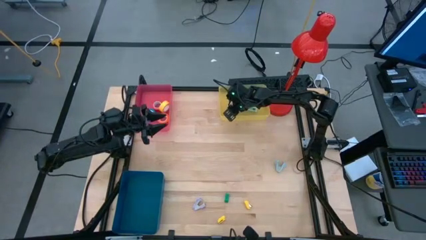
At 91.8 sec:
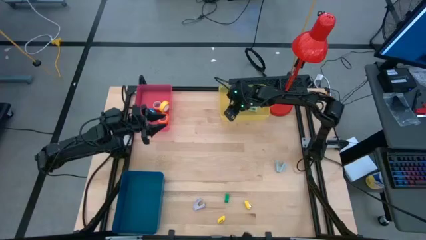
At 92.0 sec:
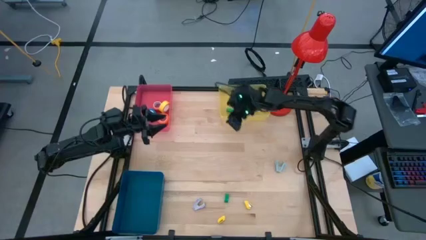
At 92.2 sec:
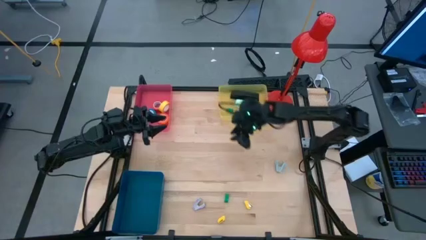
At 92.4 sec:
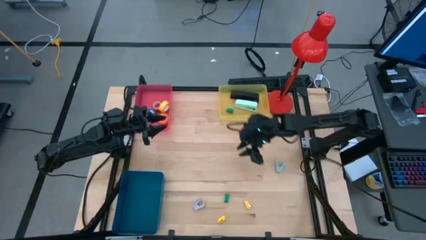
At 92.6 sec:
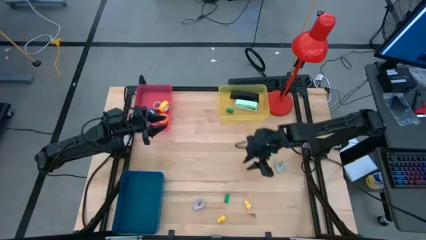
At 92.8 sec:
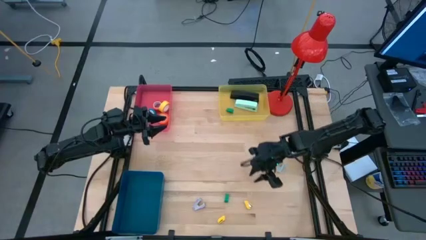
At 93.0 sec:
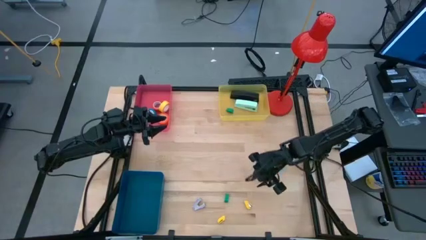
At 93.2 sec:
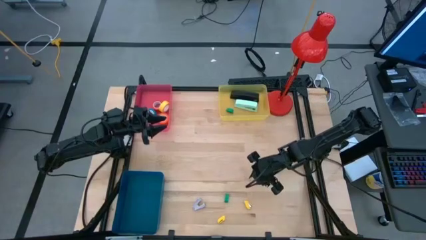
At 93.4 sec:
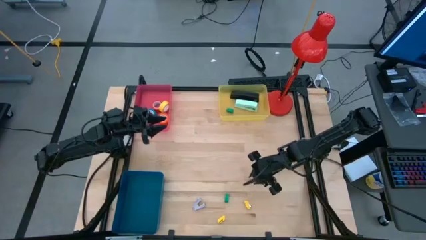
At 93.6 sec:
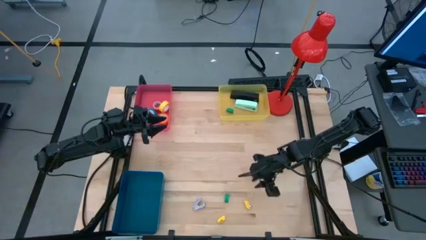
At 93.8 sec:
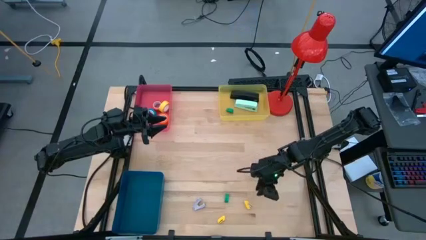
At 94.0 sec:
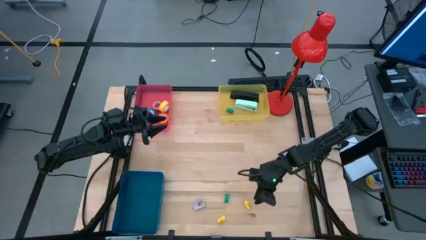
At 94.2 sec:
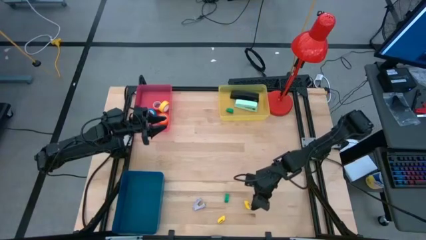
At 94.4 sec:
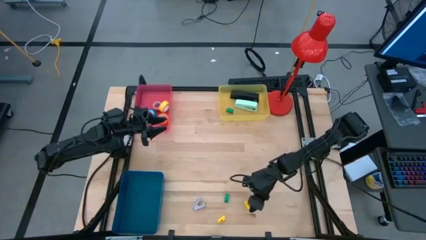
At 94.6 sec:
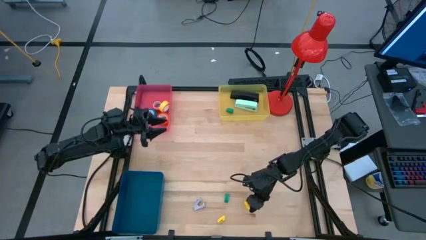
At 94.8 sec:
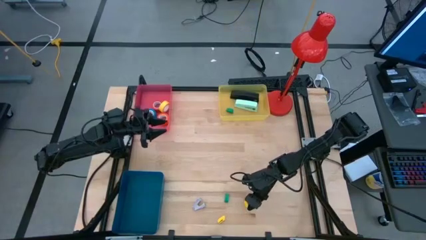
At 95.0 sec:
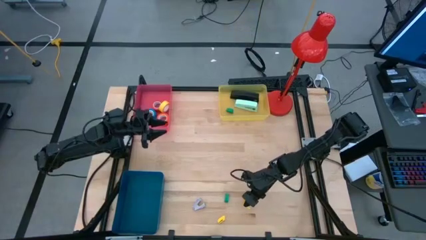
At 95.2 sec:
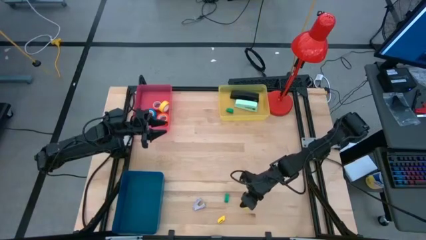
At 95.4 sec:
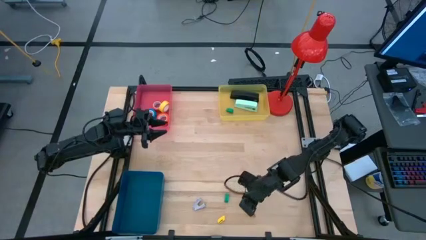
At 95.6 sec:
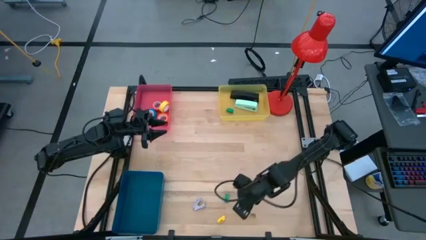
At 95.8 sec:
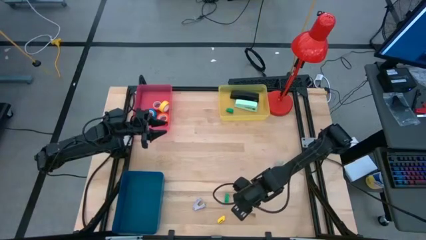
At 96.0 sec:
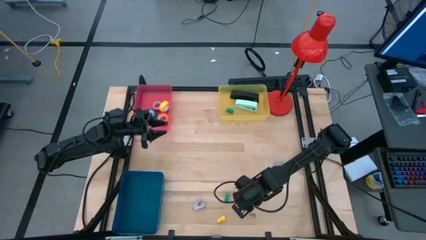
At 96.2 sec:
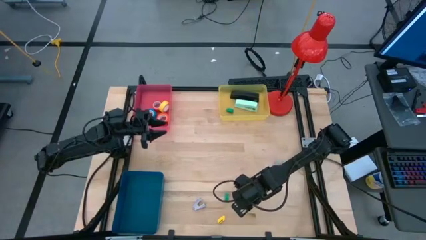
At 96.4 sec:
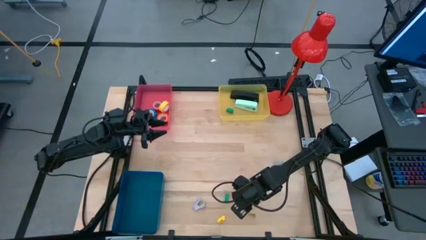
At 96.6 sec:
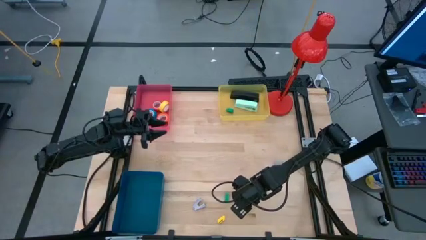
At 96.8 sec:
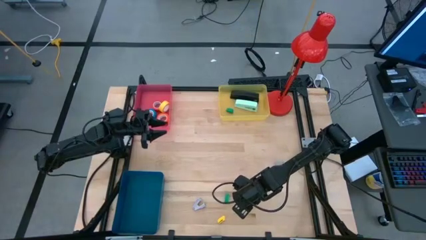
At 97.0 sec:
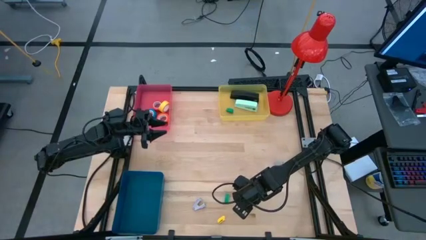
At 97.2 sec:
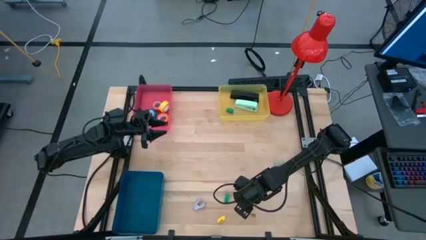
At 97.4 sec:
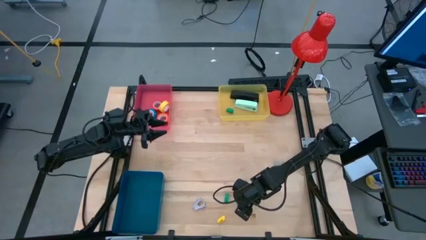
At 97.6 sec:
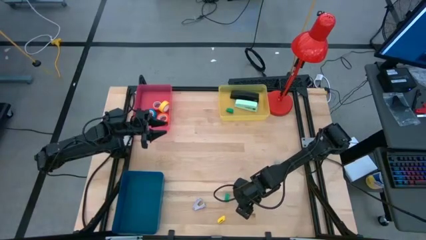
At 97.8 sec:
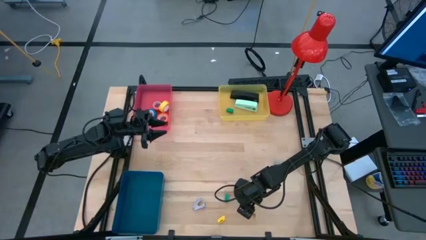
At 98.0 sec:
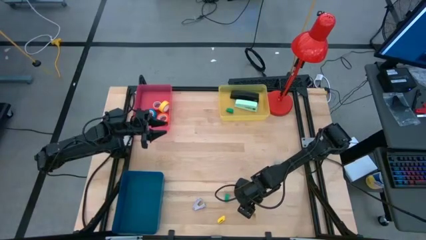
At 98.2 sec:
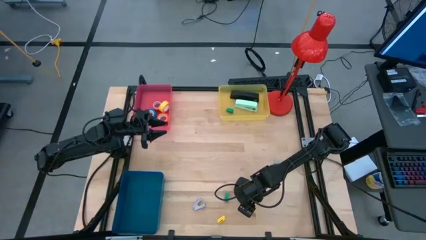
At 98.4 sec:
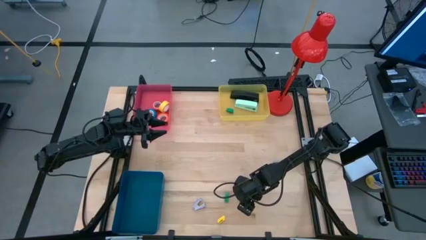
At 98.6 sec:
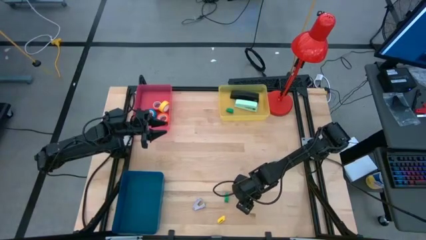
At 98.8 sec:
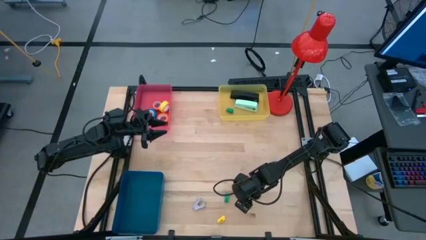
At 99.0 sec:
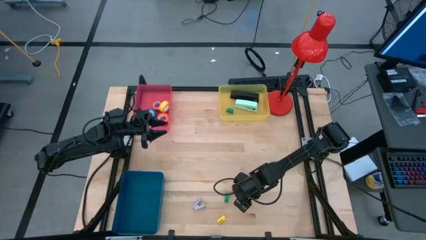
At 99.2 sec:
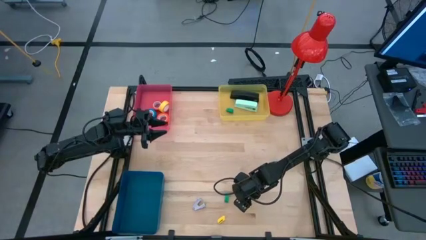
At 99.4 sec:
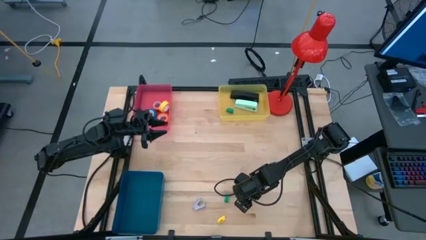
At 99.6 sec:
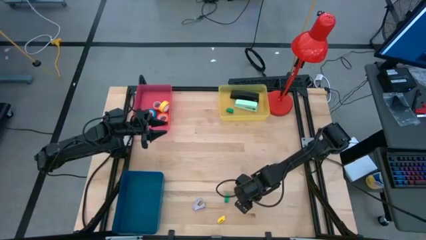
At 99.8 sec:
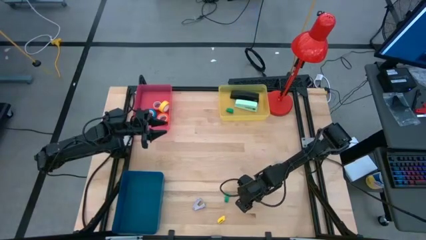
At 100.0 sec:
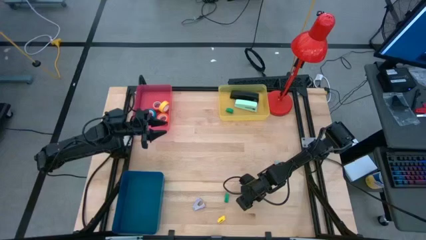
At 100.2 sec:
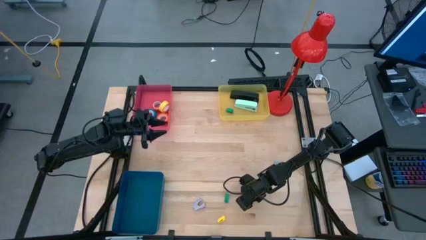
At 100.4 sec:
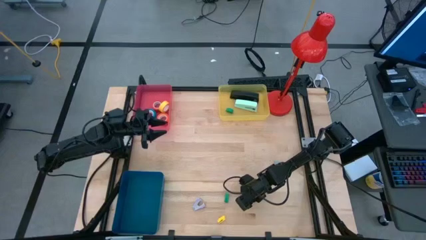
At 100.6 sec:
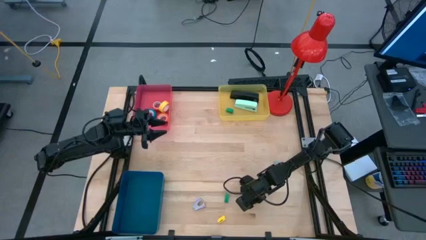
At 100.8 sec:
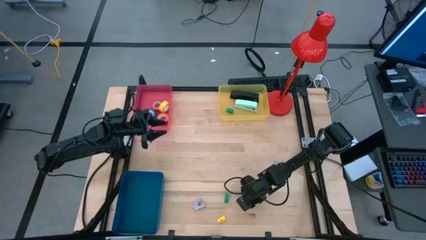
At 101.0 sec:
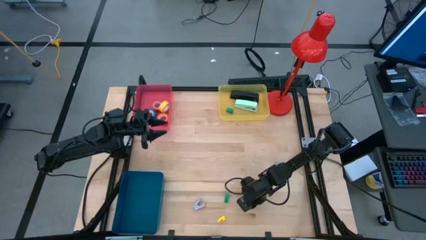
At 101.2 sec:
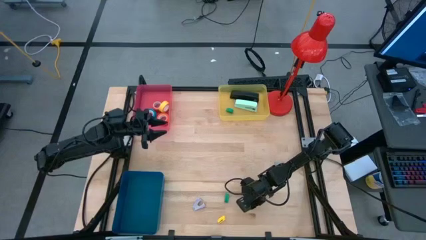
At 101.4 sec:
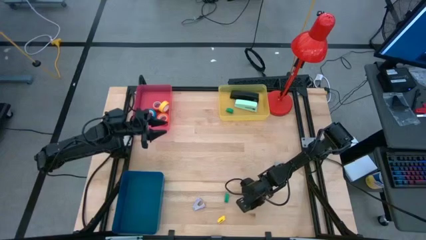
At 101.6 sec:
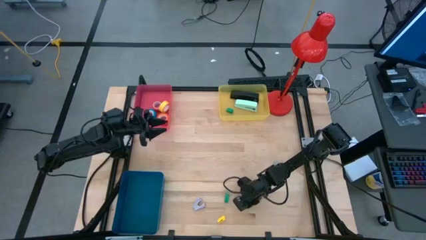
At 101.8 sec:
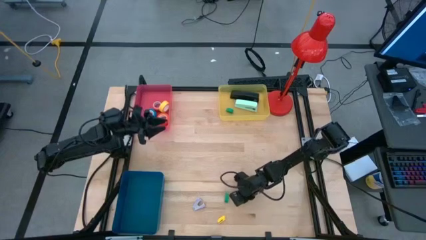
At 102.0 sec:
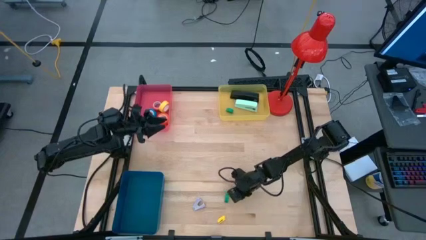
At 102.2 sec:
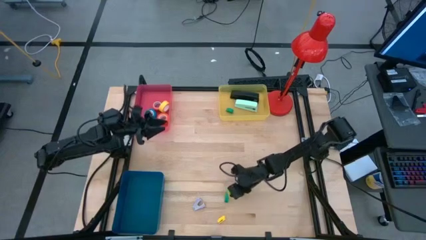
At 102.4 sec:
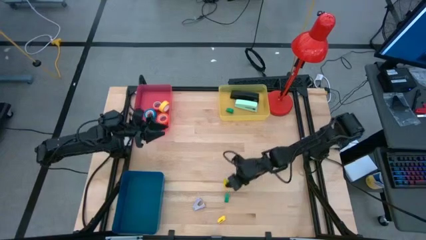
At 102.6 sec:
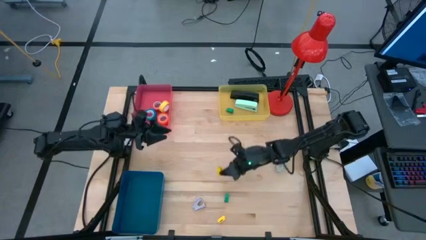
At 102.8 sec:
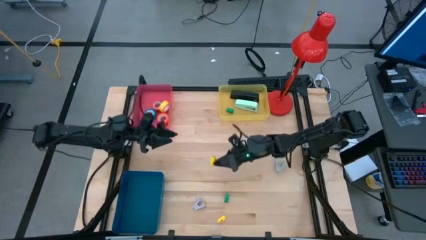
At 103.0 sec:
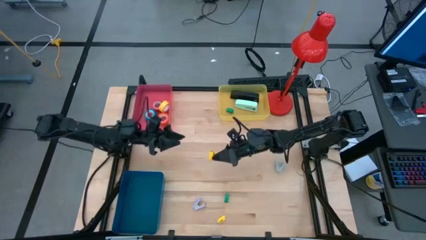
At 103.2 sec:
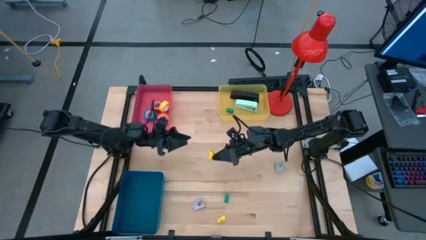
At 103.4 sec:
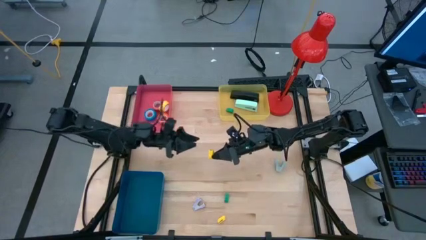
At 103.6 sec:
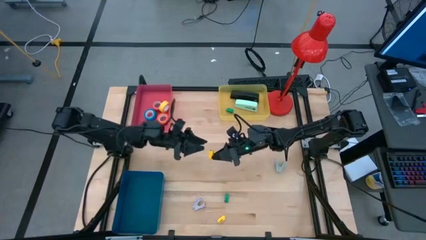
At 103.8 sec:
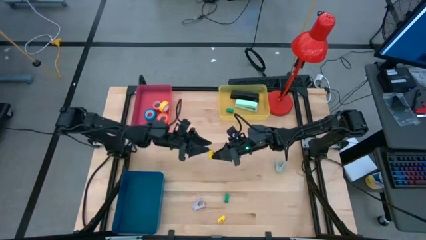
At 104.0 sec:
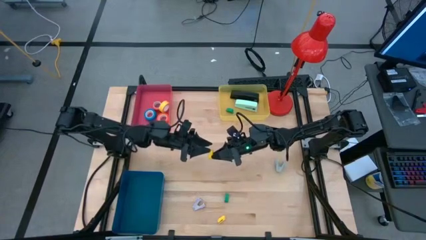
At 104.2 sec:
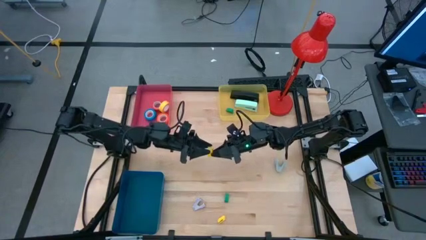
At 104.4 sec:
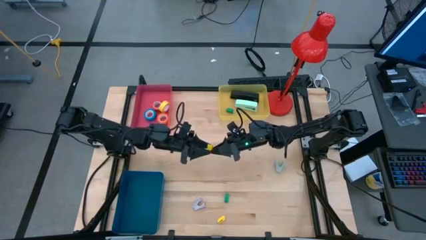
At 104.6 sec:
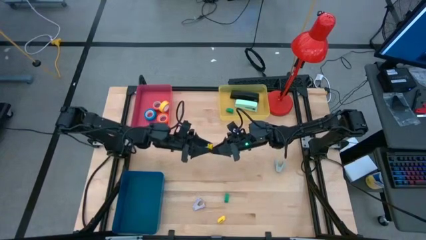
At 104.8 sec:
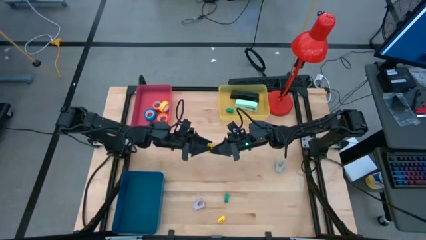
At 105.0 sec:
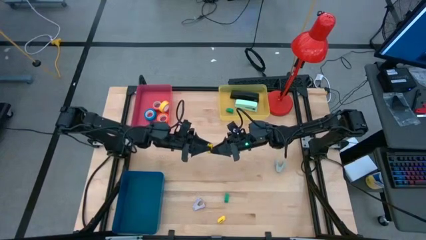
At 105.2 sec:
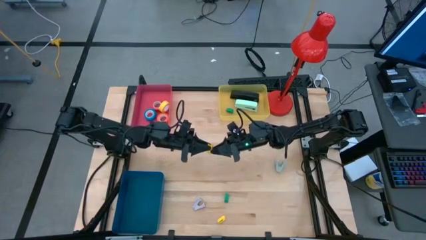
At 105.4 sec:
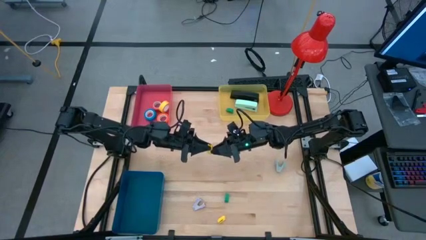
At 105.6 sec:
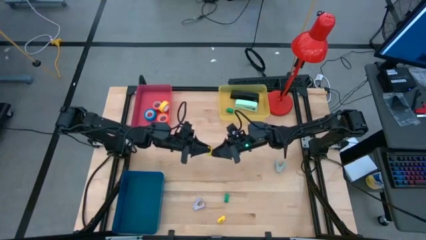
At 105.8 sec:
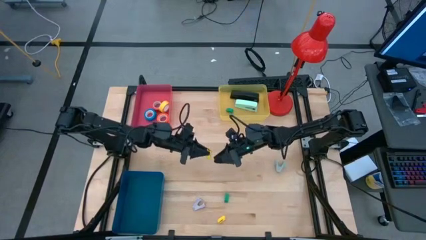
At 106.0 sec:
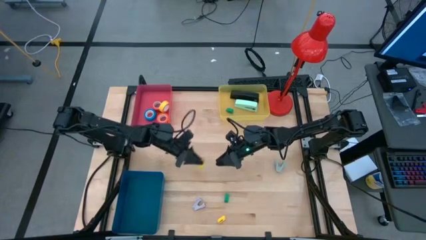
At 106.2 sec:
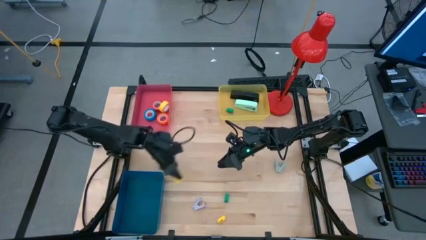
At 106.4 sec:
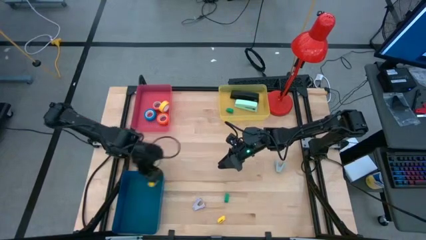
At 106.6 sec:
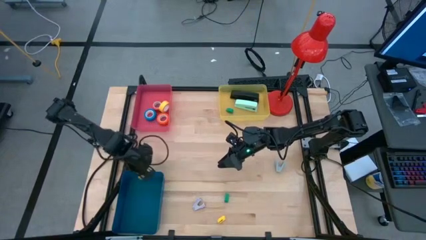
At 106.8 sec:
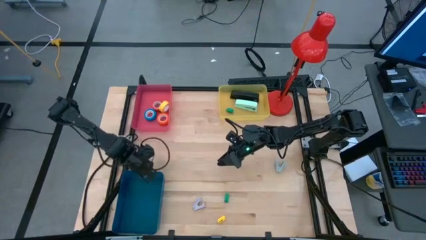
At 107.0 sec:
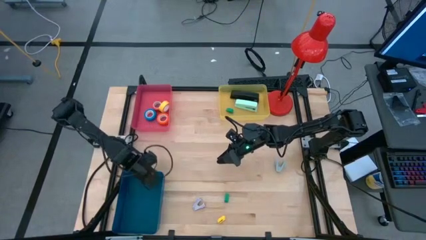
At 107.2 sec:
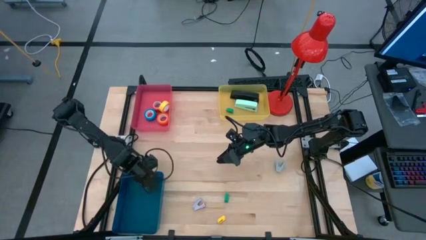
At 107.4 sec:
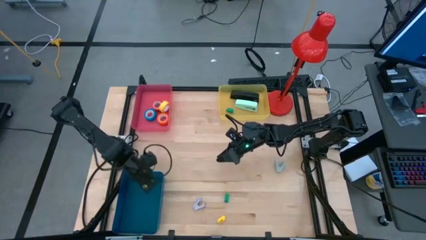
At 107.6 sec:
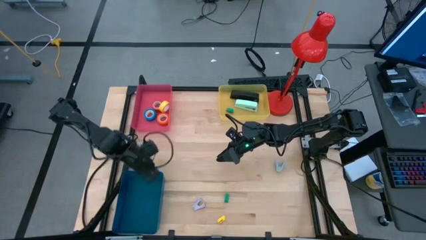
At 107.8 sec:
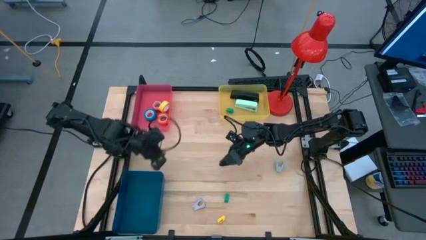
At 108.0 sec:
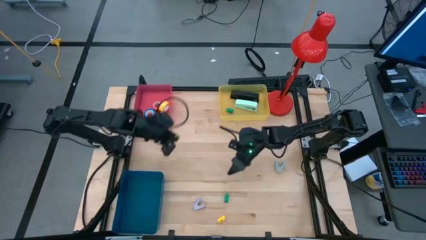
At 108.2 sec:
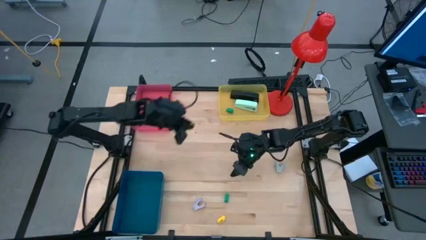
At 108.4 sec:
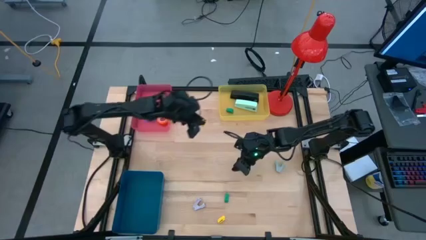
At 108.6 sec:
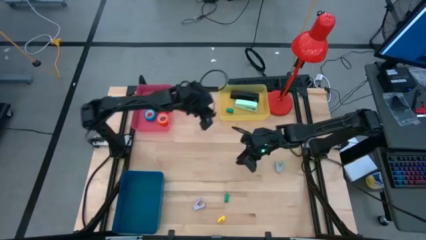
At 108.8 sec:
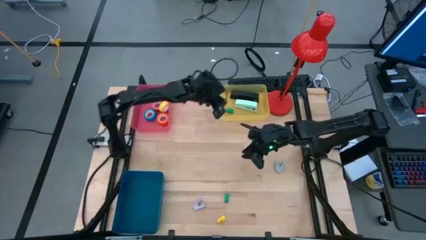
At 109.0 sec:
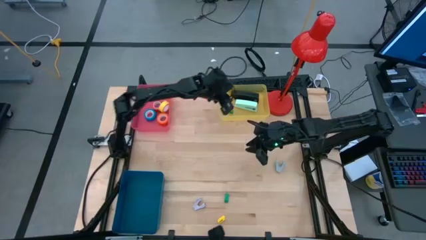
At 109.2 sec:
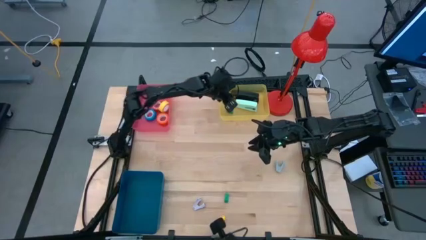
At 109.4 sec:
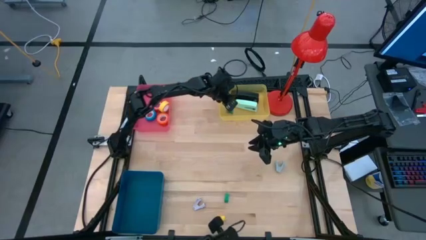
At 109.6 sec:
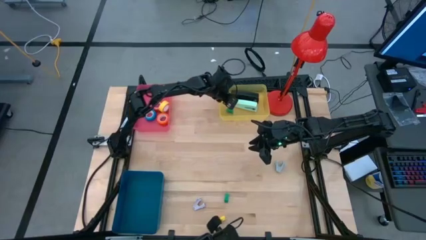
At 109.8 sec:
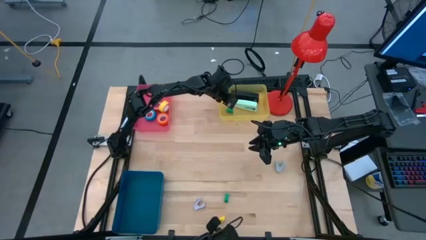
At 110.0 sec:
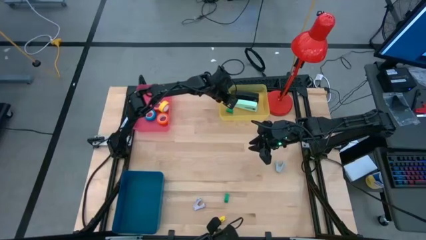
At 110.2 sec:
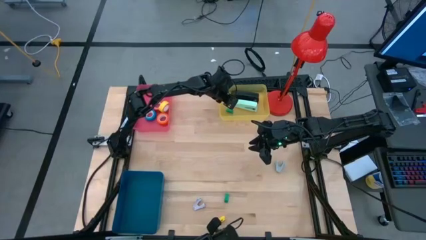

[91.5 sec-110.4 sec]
Task: Pick and place Stapler, Stapler remover, tape
Put the small yellow stapler into the yellow bin
